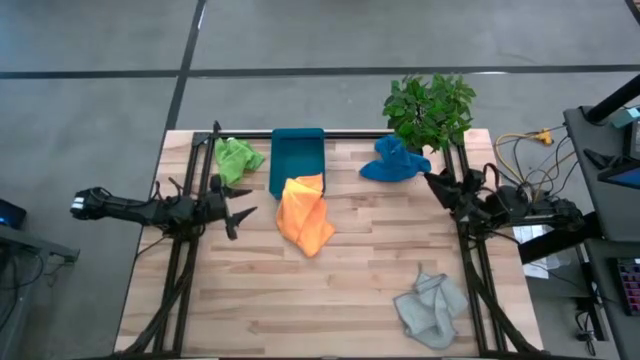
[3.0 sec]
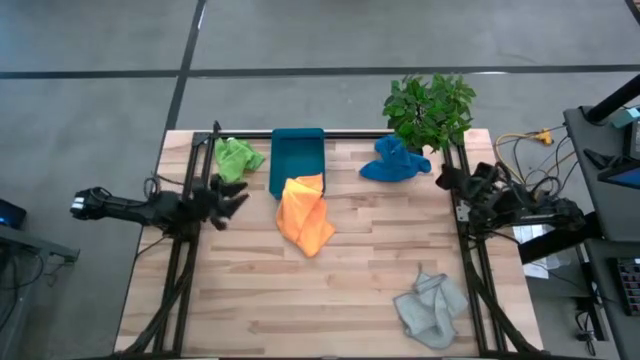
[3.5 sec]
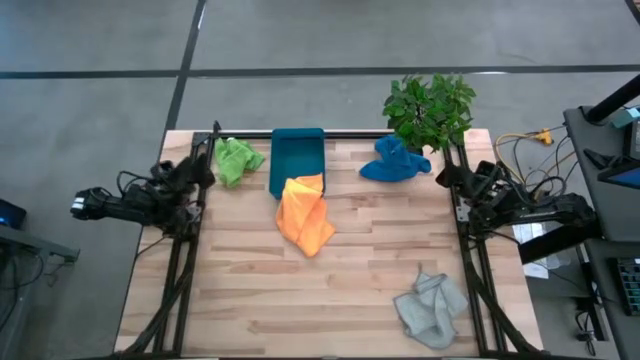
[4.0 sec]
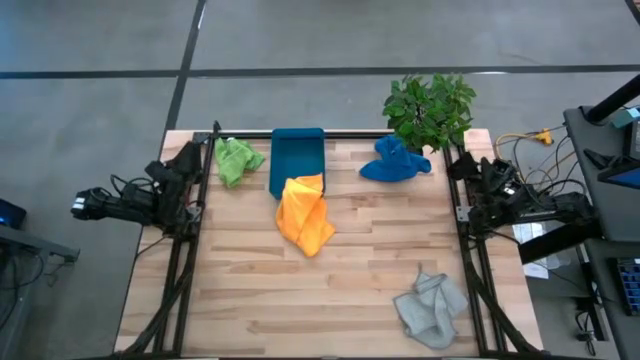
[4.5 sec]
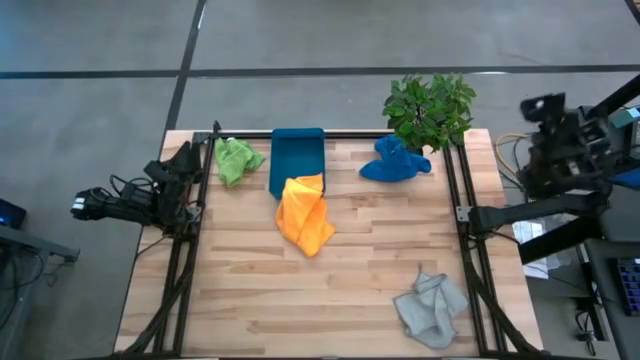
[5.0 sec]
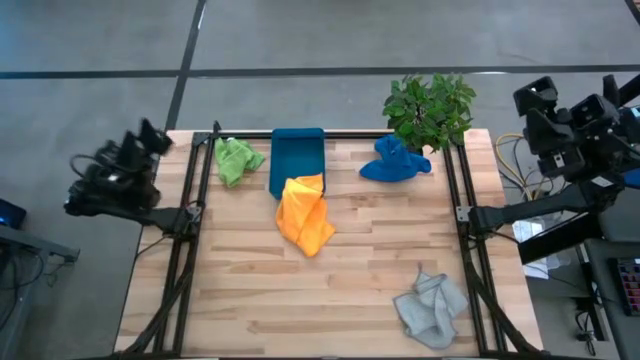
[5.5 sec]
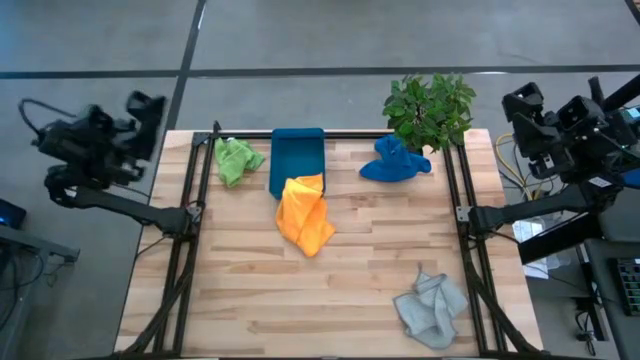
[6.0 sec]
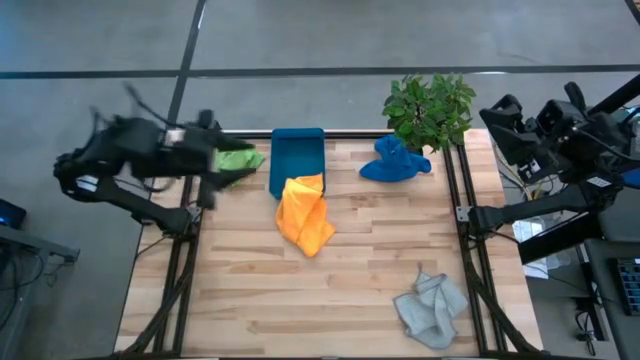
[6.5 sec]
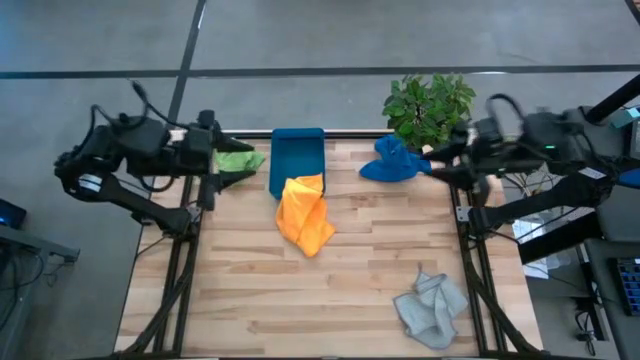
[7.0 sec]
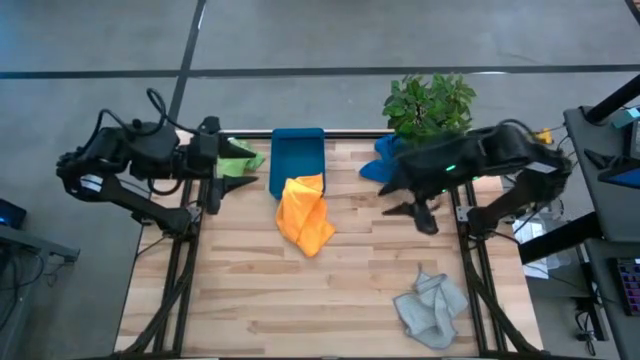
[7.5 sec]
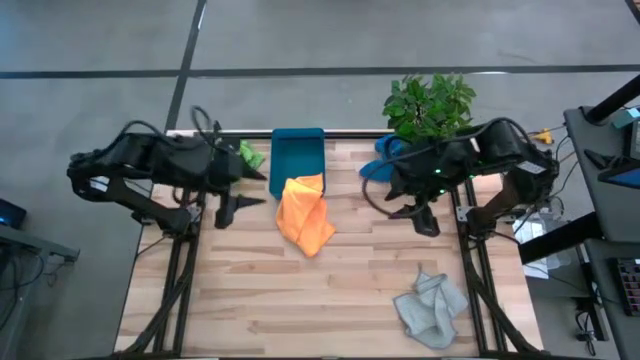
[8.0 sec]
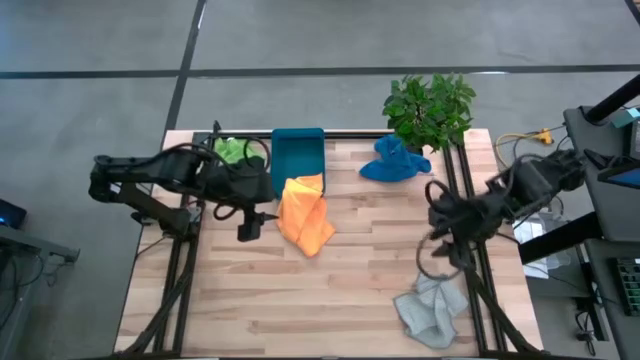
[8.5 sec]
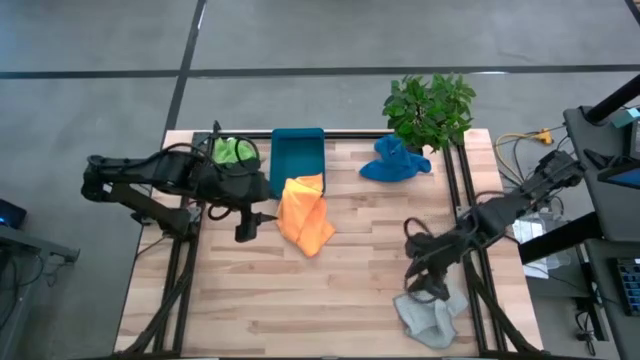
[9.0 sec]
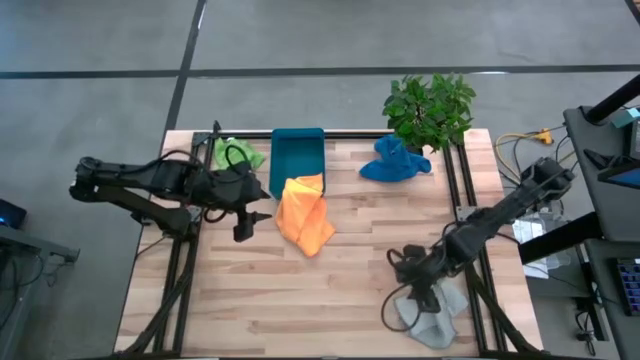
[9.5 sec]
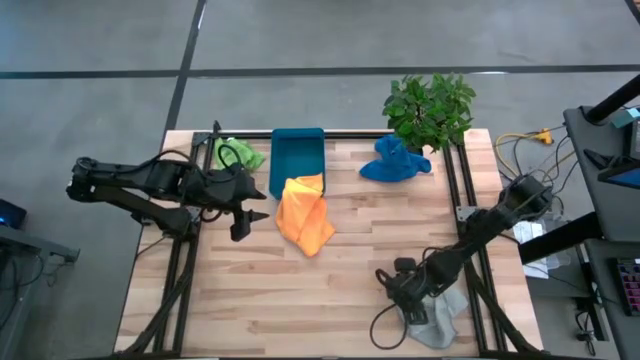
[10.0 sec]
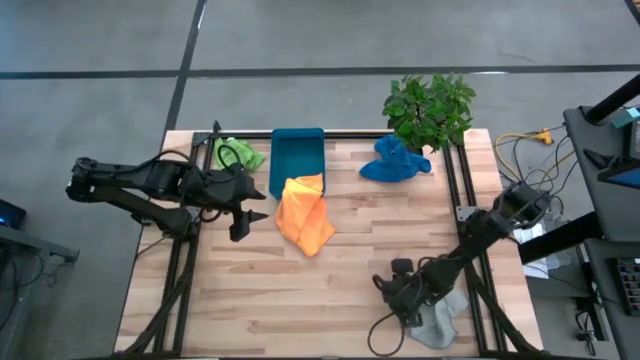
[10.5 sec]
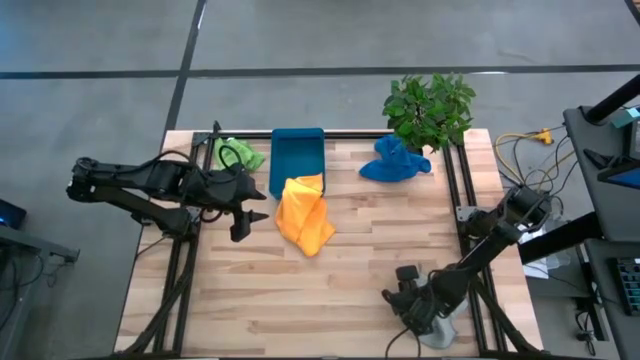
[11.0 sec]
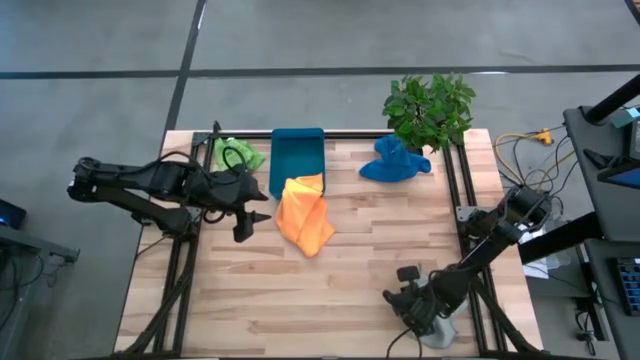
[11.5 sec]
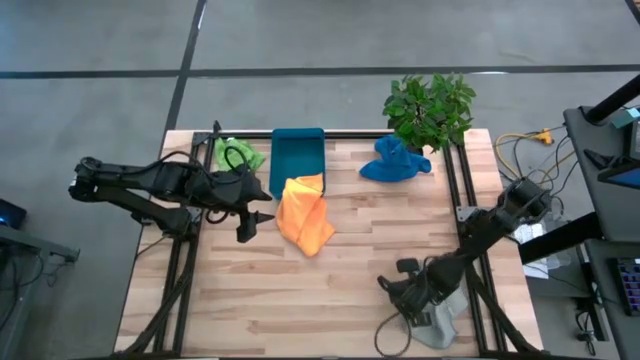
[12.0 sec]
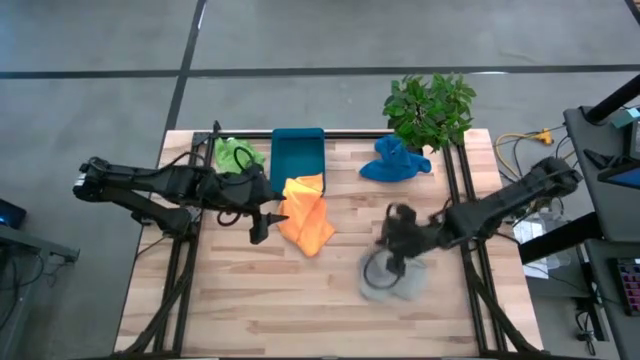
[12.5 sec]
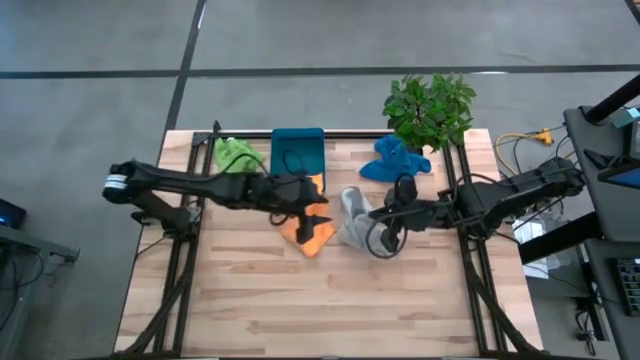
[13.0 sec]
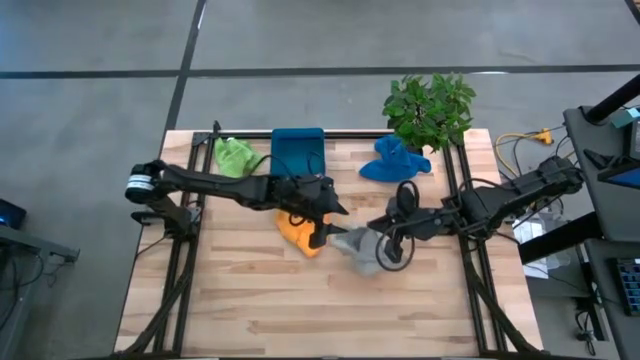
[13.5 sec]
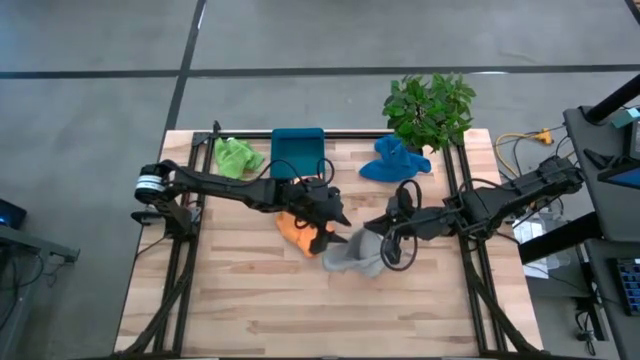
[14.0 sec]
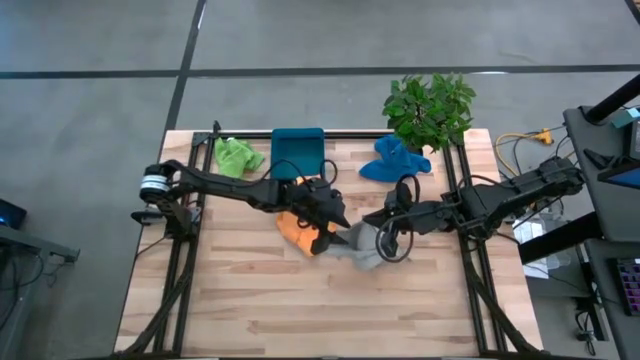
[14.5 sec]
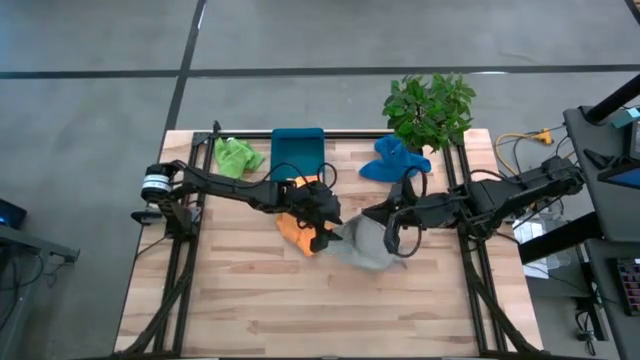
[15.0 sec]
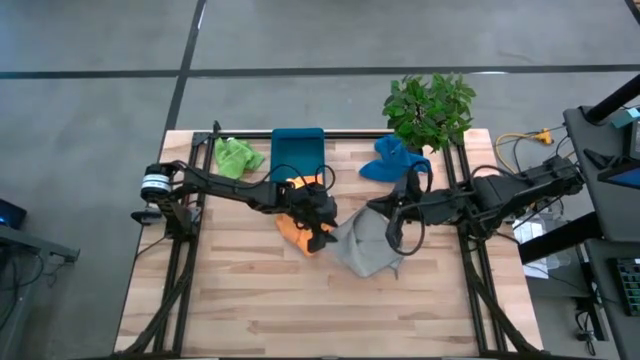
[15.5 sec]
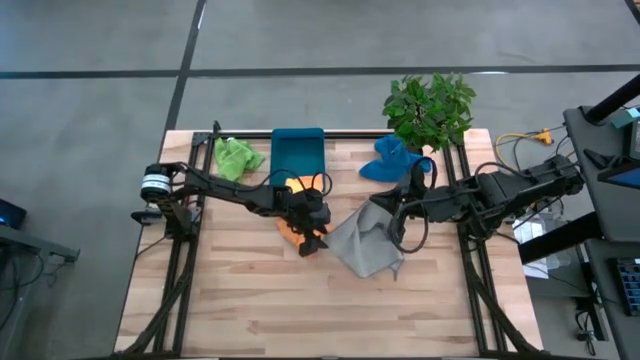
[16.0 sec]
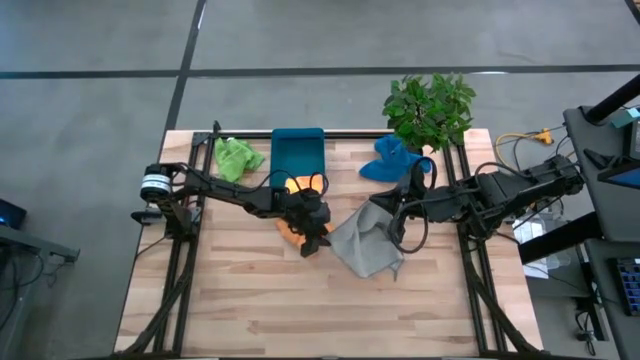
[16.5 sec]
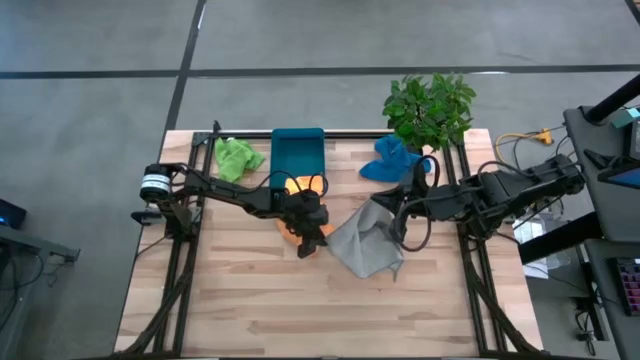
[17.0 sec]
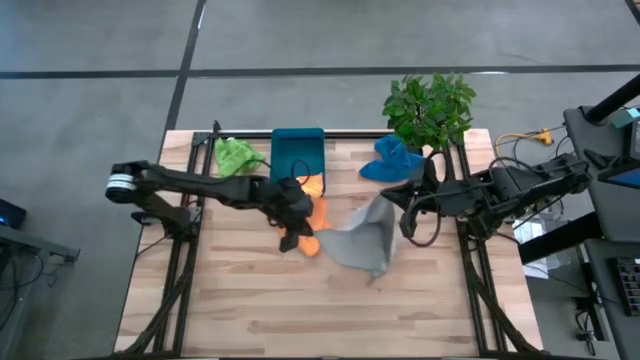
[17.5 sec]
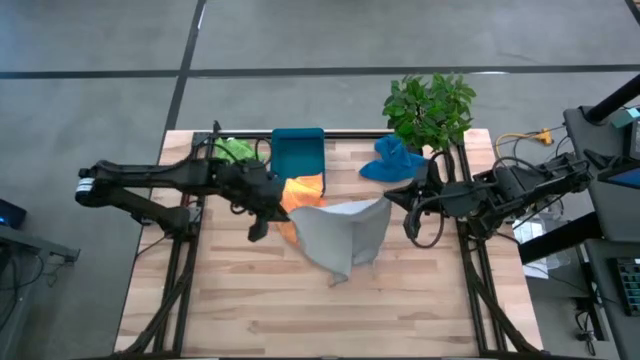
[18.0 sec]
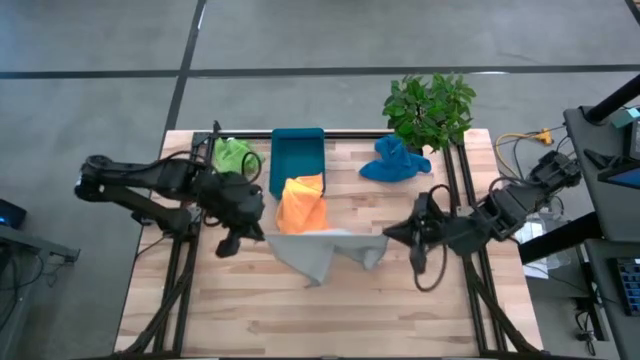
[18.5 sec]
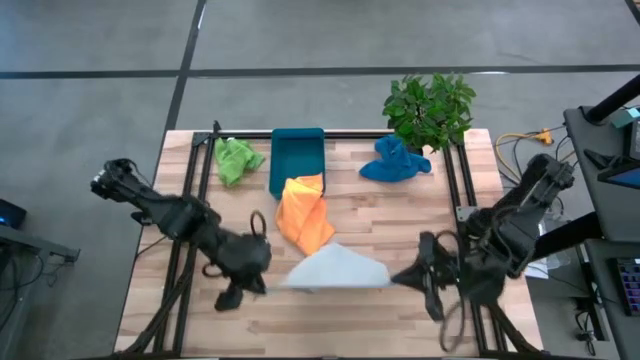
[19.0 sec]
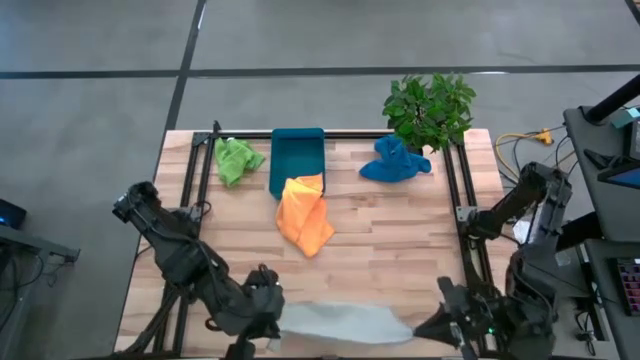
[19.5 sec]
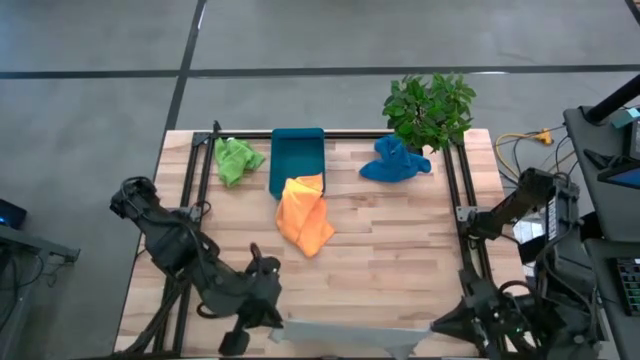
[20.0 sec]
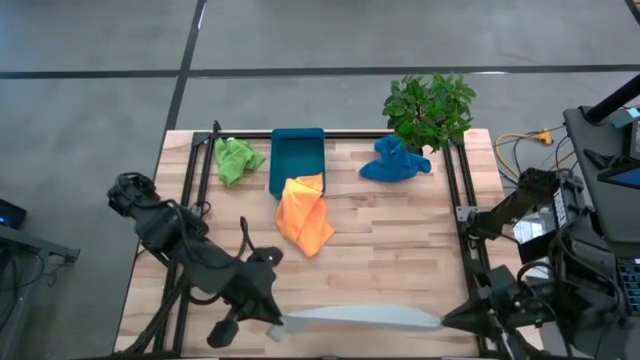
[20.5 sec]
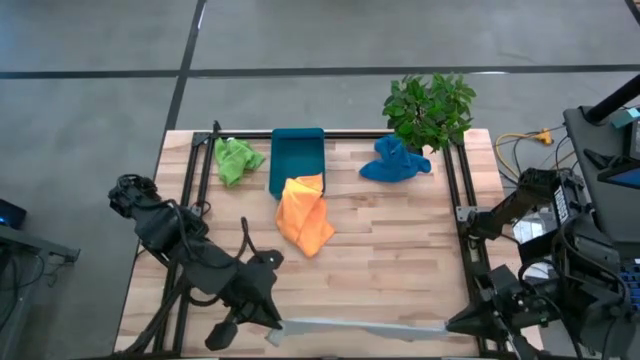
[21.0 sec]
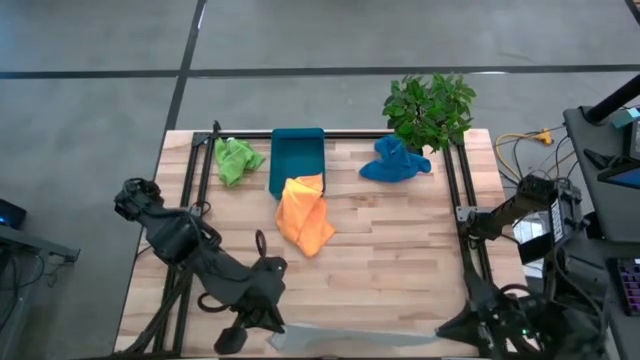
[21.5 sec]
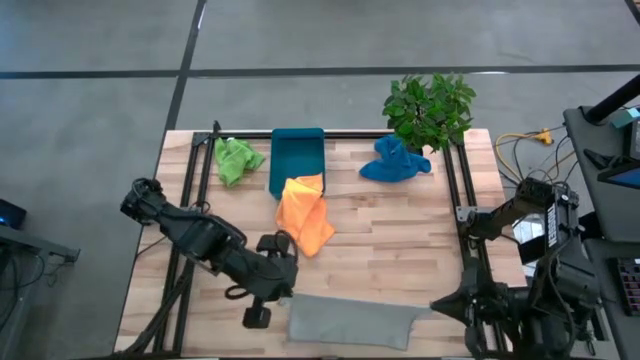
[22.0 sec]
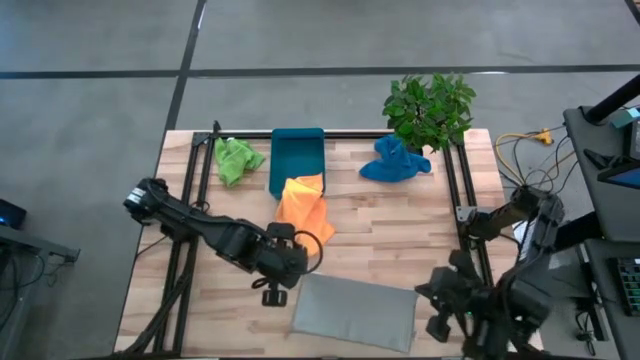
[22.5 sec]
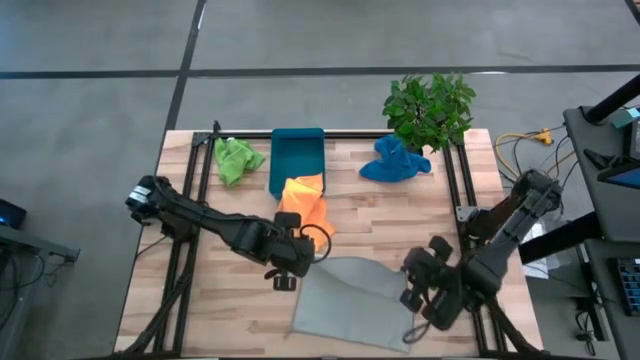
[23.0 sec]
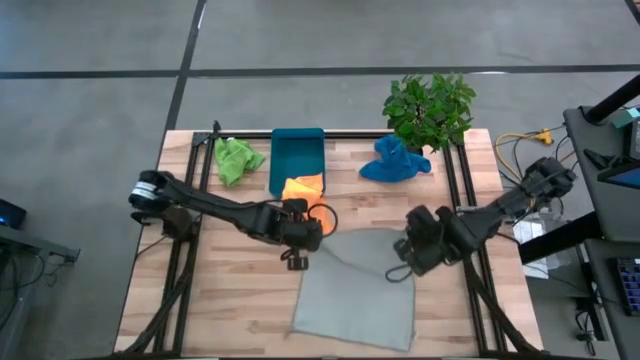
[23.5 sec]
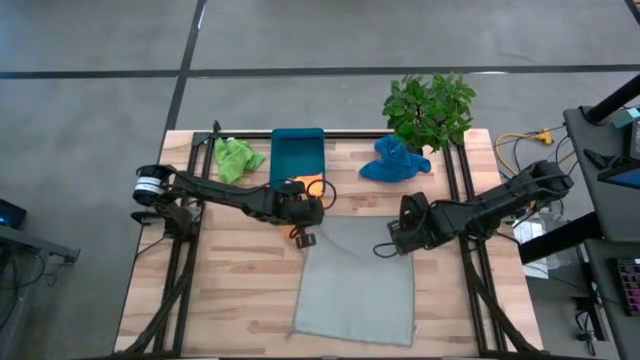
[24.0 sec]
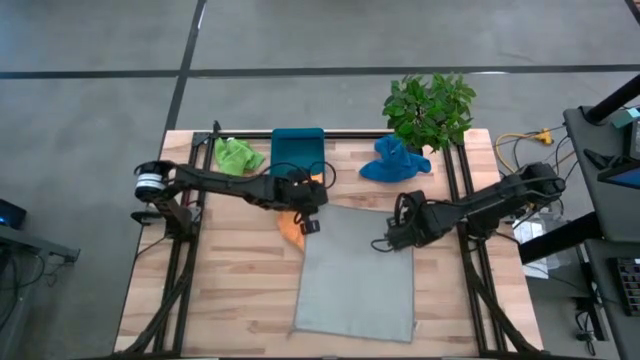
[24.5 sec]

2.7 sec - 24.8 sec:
Task: Fold microfiber towels
Prepare the grey microfiber cloth

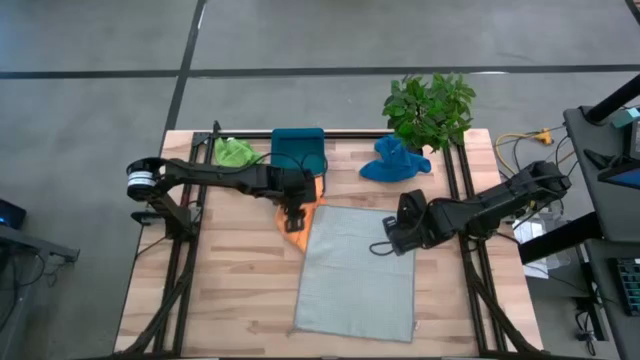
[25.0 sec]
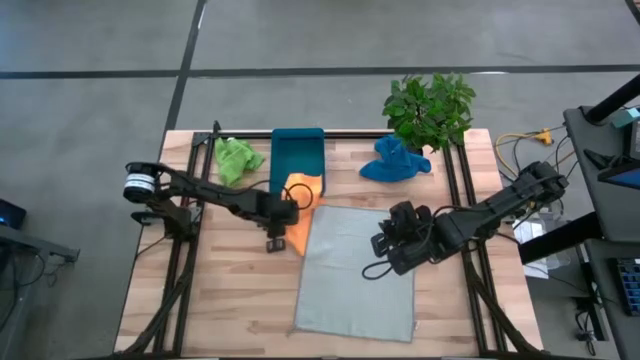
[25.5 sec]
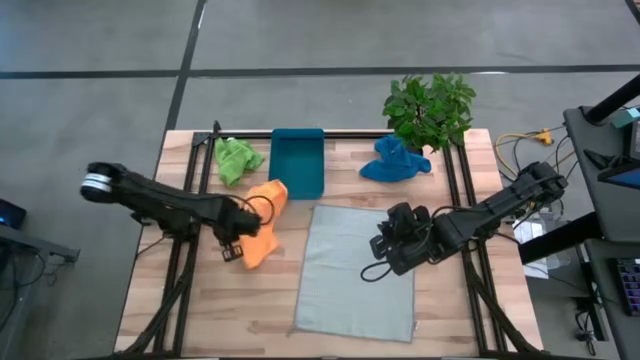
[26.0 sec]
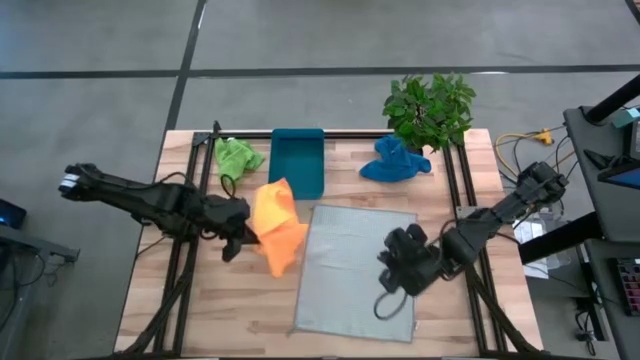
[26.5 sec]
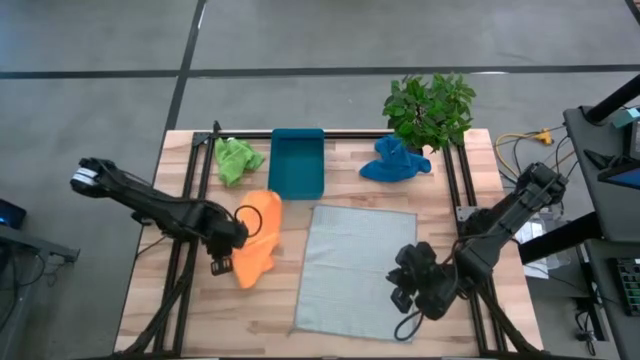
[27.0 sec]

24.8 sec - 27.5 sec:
Adjust the orange microfiber cloth
